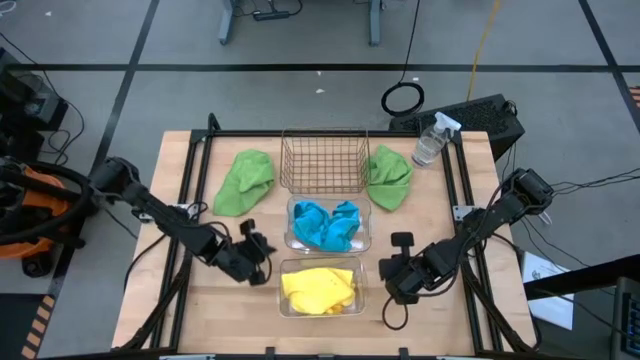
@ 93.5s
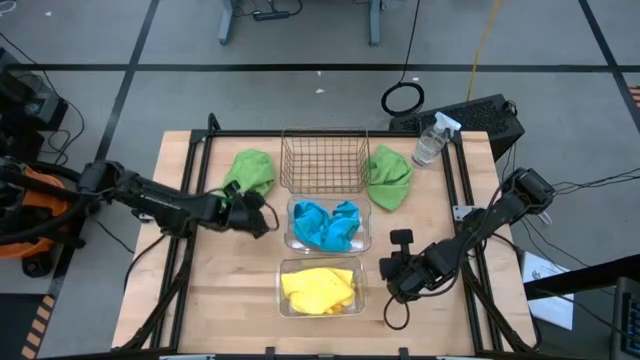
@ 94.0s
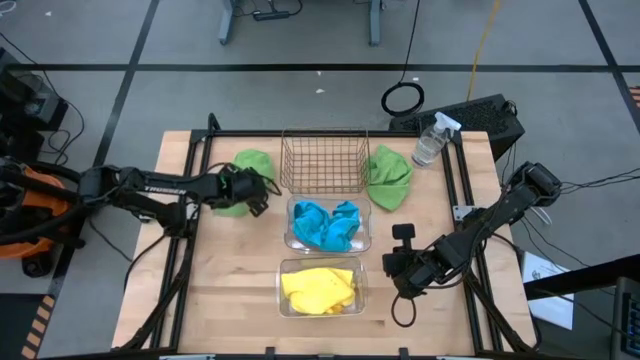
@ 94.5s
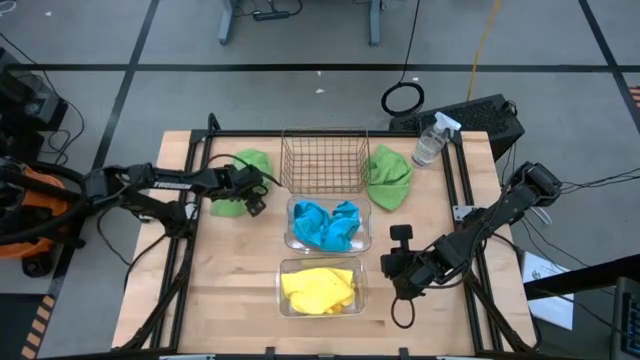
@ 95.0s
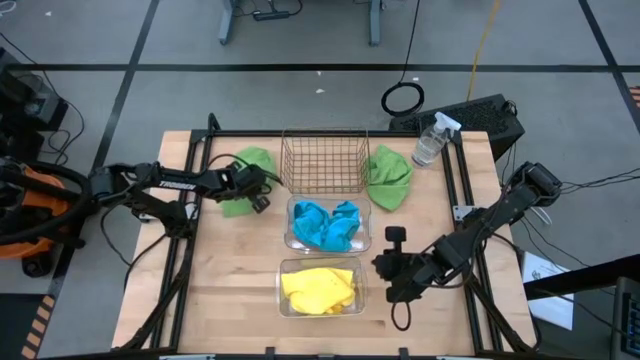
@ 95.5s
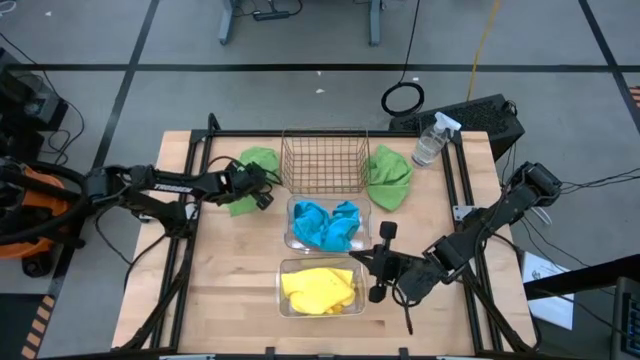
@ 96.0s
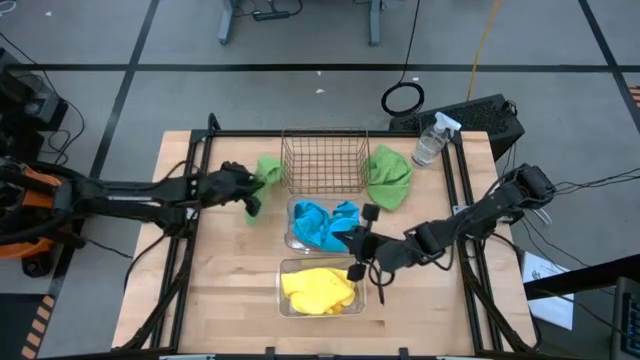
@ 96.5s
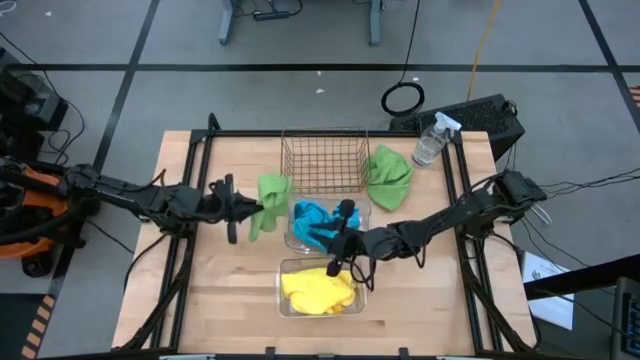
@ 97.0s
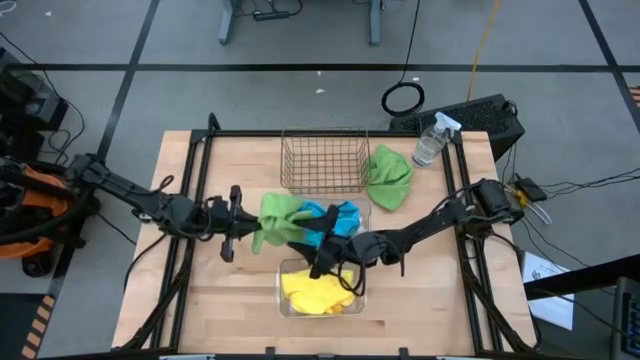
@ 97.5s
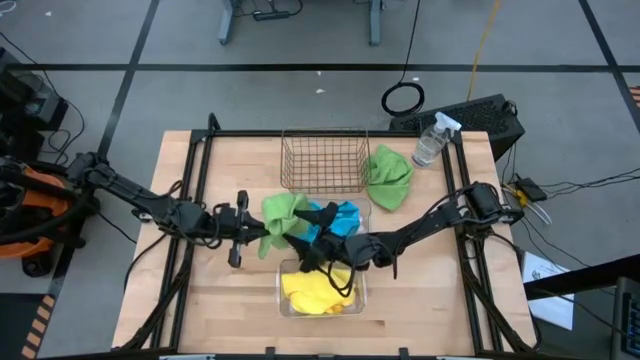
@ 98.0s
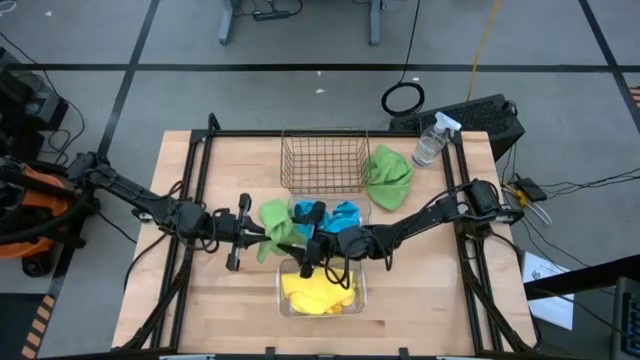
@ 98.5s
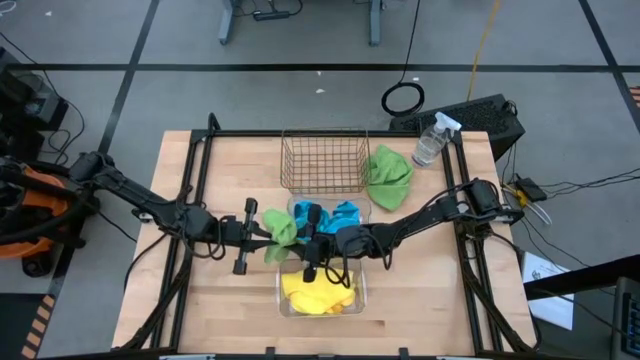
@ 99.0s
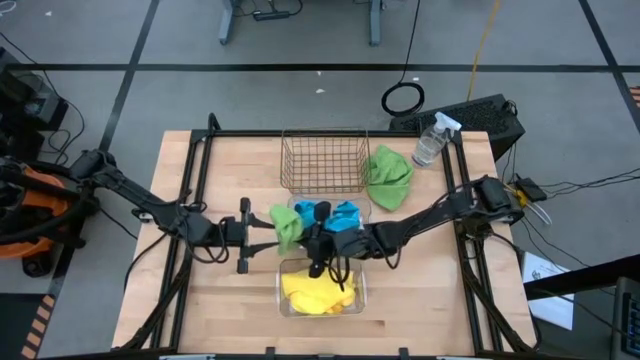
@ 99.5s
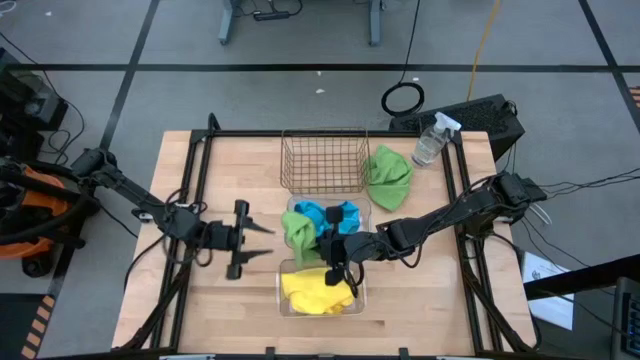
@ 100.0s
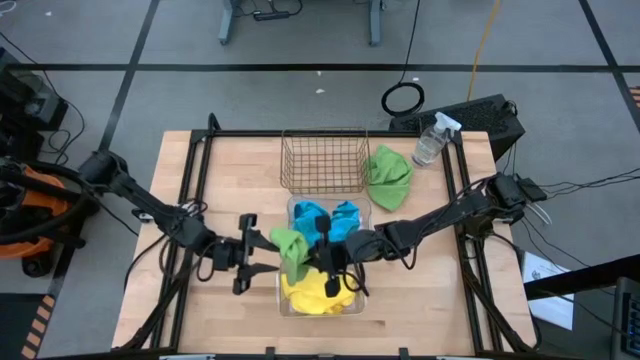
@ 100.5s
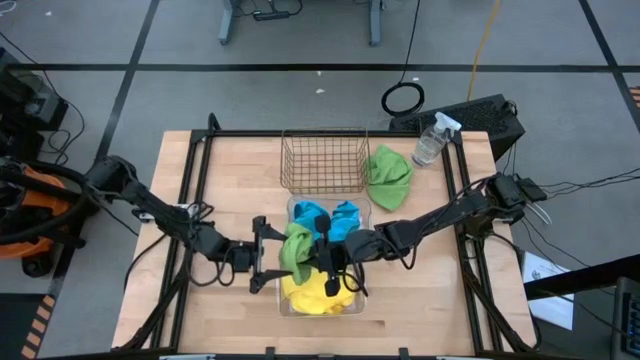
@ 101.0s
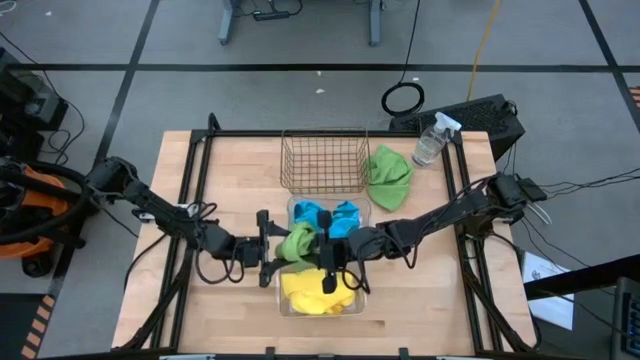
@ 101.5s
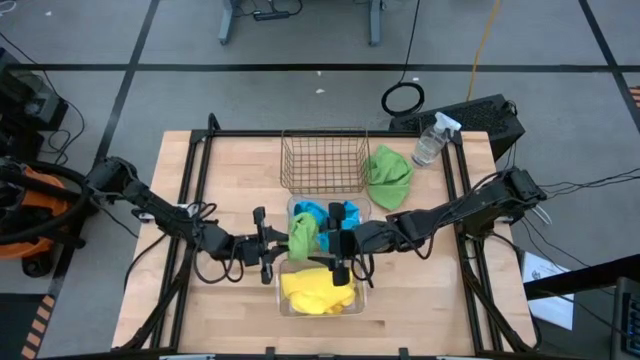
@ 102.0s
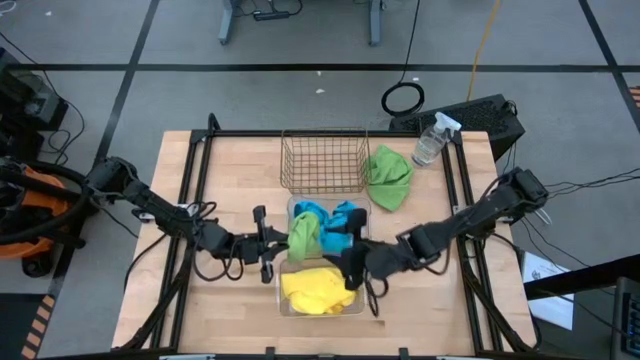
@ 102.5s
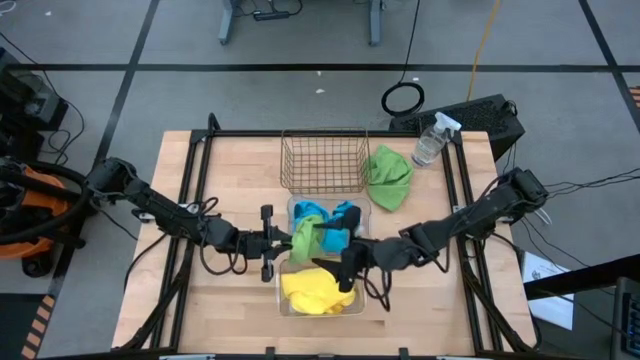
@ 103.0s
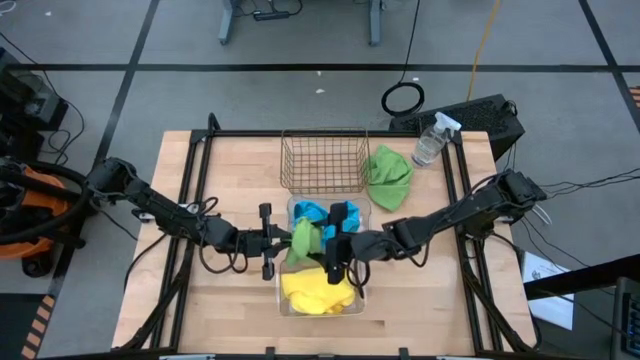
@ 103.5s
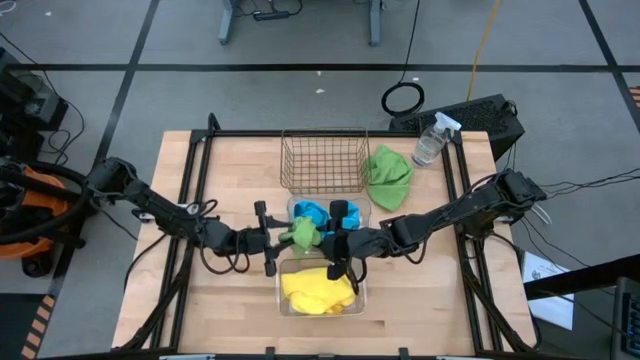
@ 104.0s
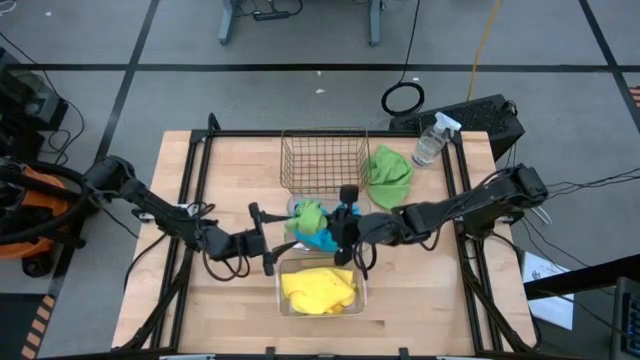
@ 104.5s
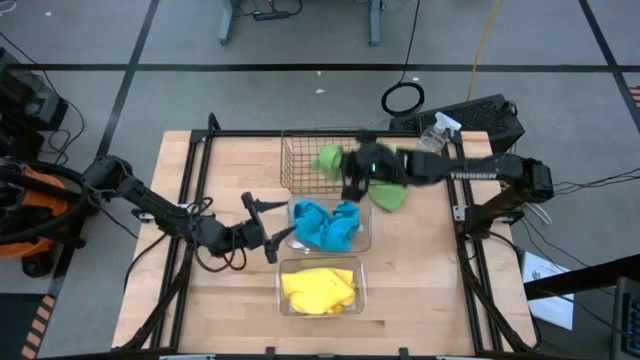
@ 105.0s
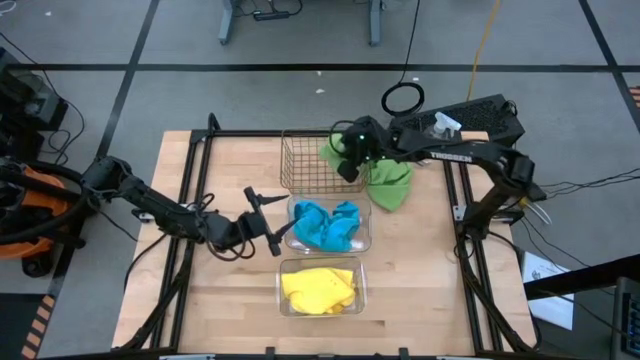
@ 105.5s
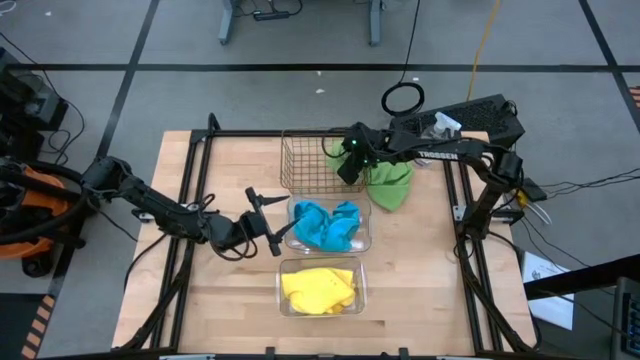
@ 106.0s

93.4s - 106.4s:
Task: Sort microfiber towel by color & place in baskets
Put the left green towel into the wire basket

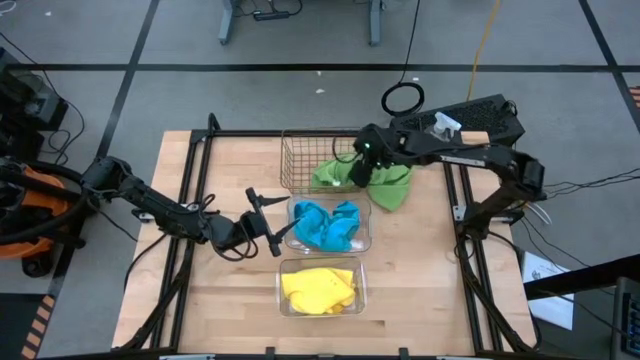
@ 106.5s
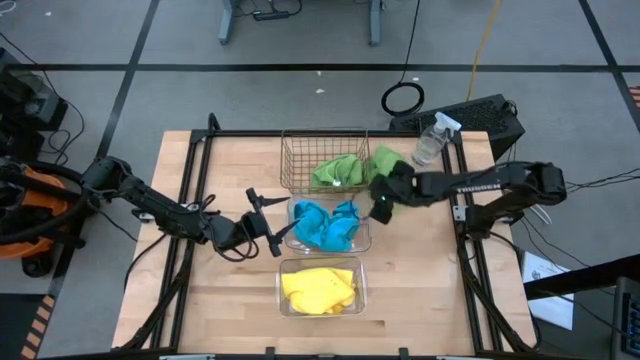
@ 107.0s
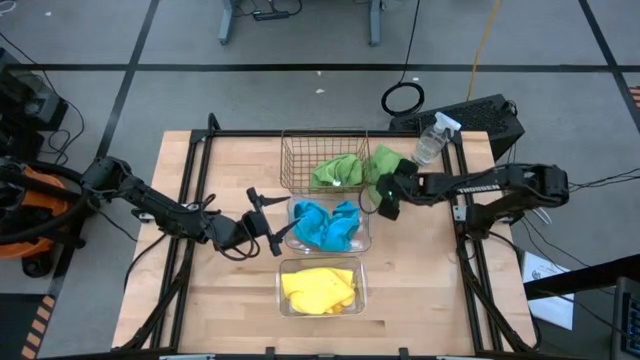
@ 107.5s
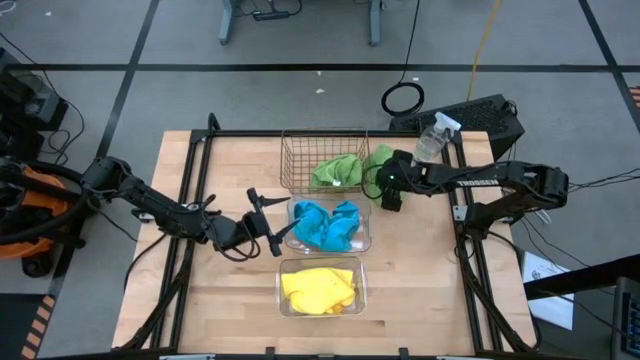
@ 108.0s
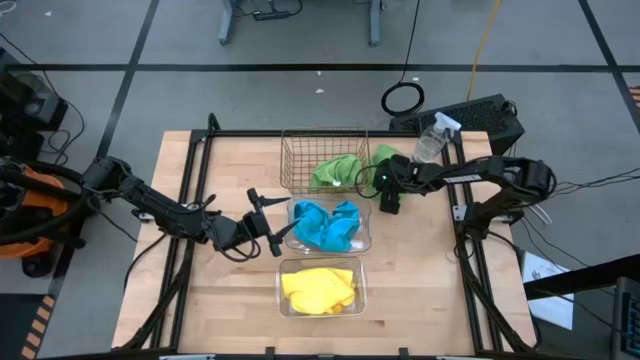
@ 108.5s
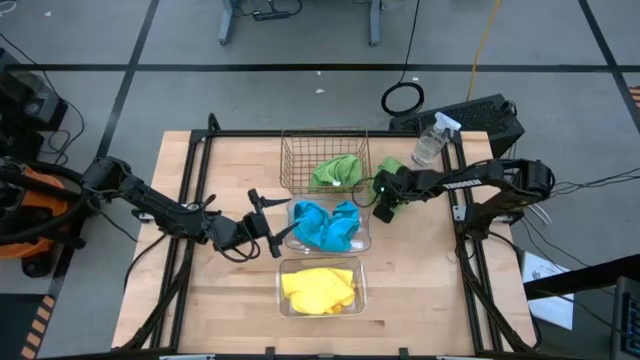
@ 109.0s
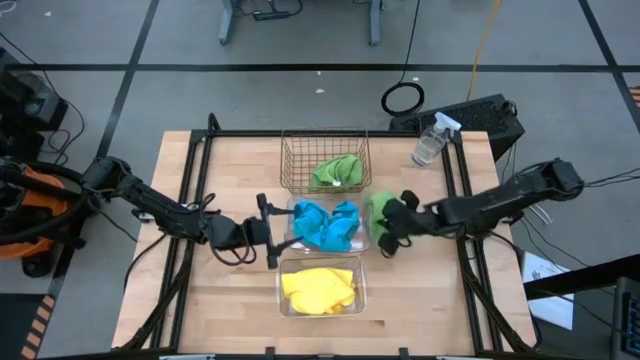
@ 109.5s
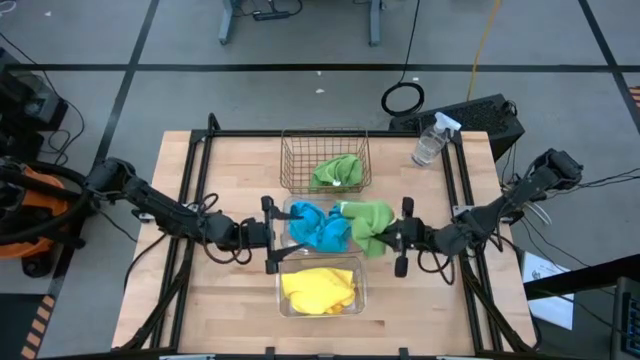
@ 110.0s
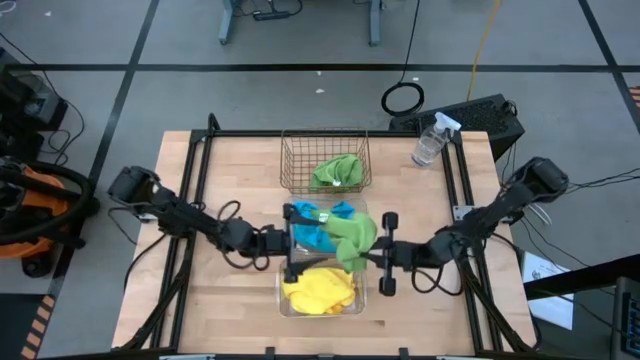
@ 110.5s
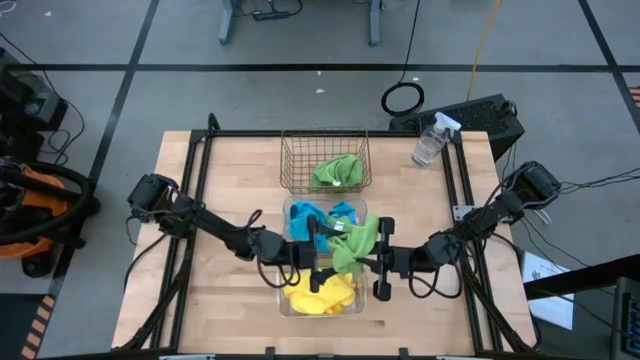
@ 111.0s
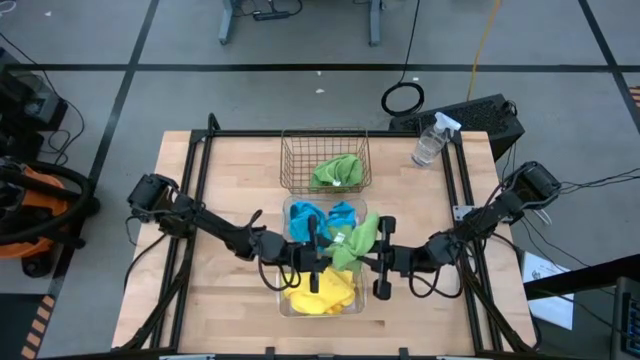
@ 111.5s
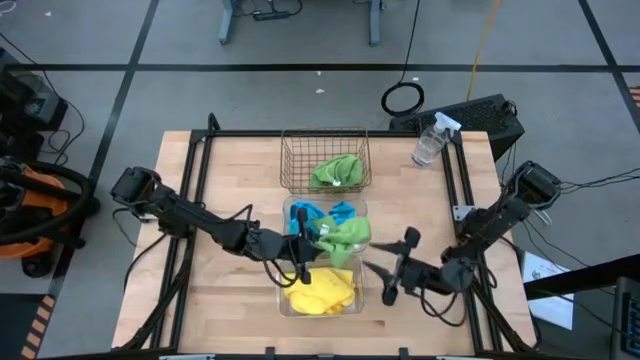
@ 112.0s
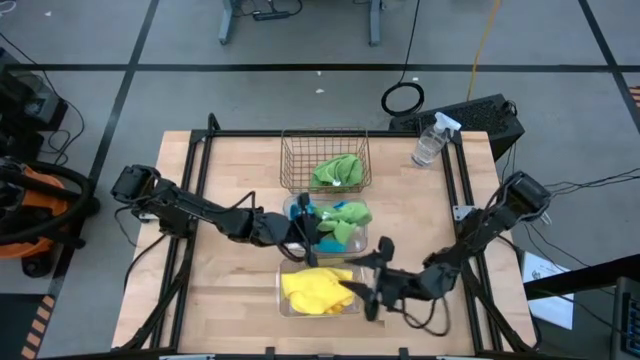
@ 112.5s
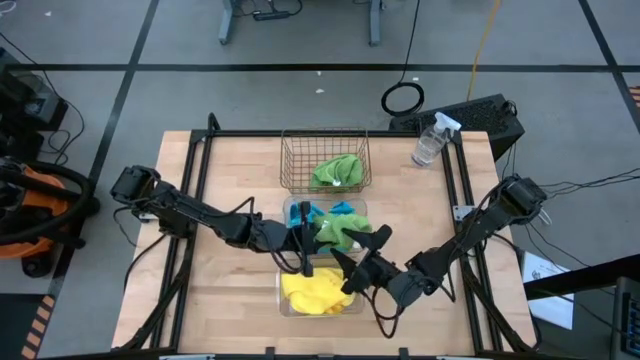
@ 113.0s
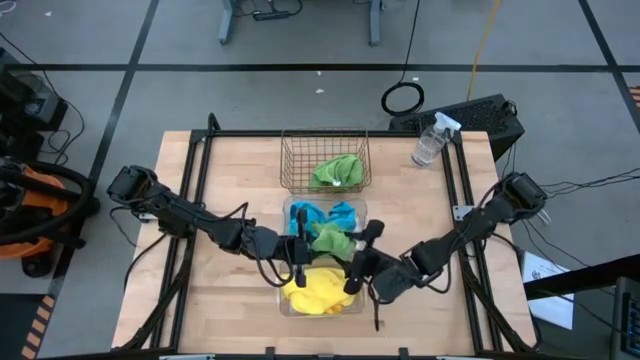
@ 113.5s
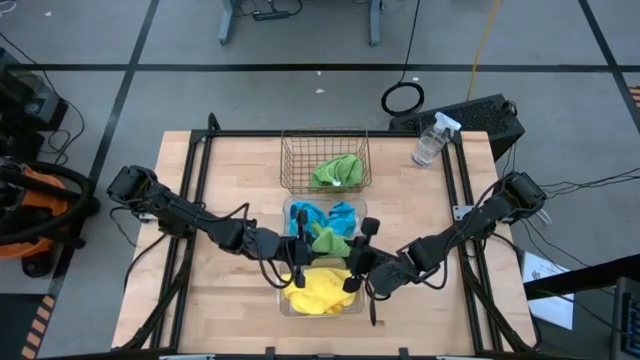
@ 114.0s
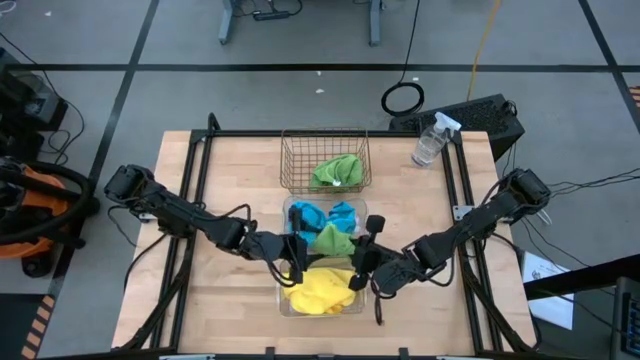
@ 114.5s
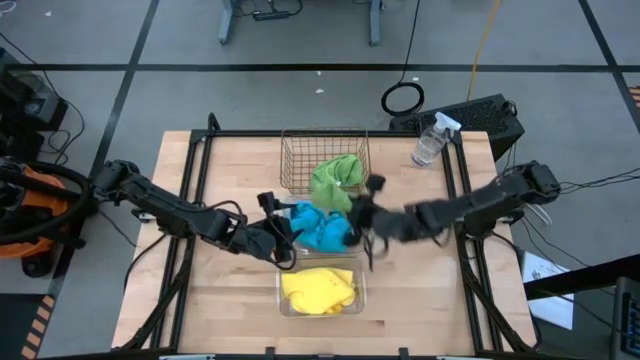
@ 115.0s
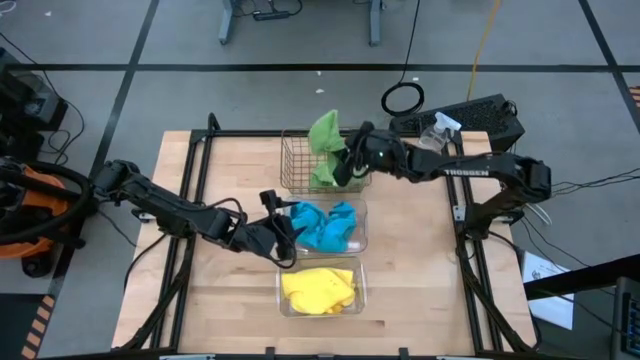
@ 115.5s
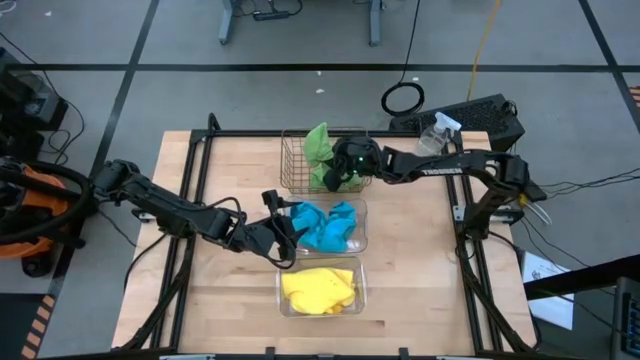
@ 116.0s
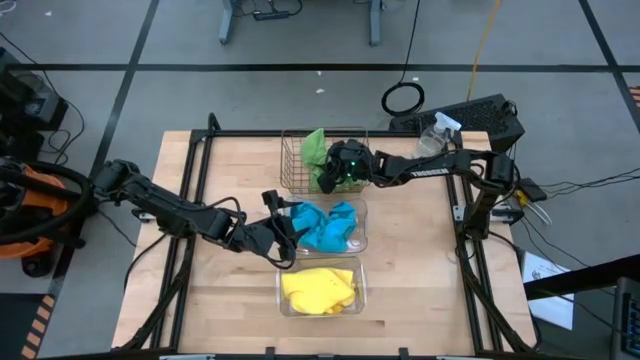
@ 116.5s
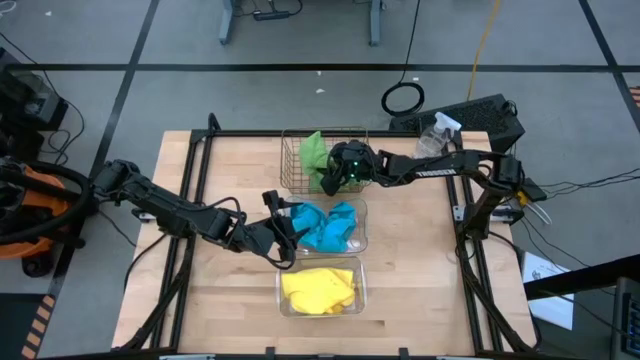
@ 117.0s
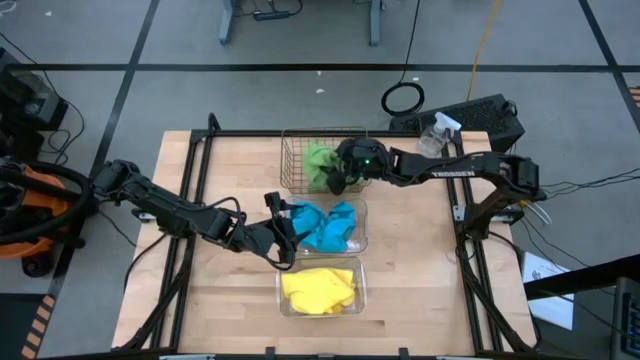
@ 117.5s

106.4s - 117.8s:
Put the green towel into the wire basket
